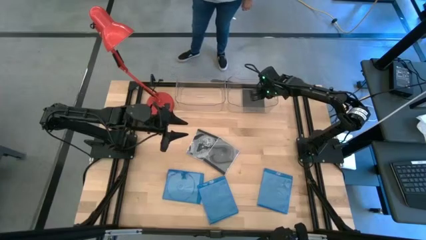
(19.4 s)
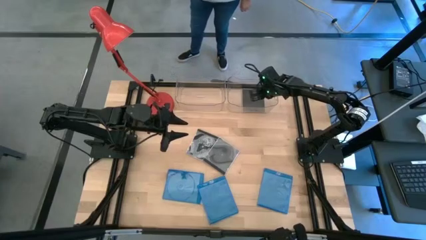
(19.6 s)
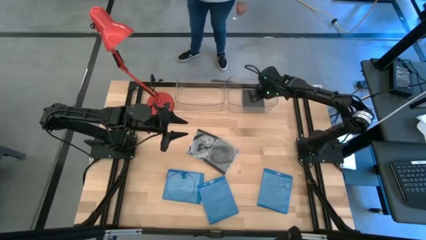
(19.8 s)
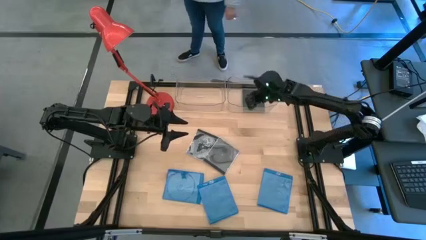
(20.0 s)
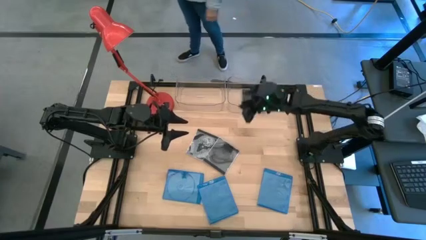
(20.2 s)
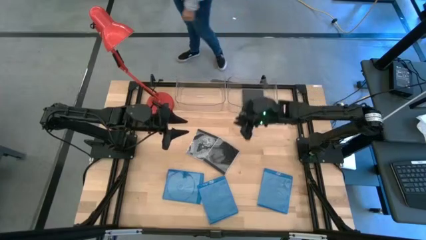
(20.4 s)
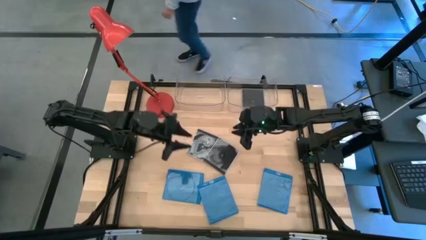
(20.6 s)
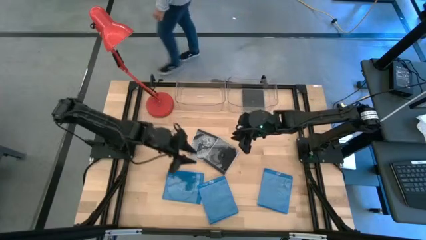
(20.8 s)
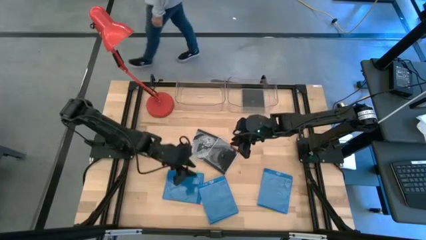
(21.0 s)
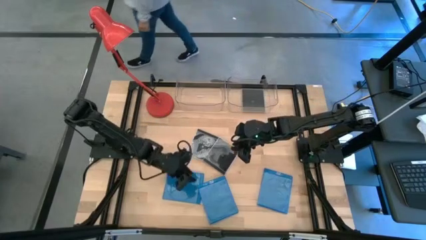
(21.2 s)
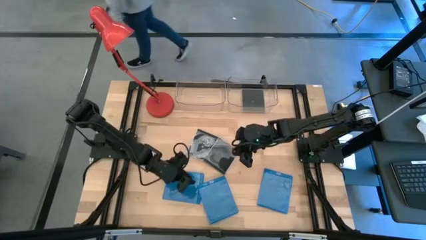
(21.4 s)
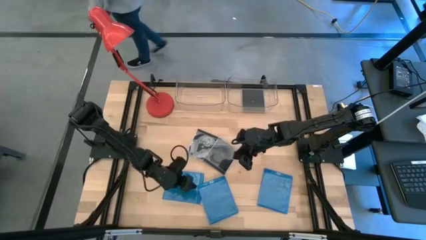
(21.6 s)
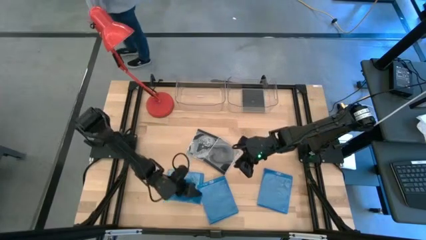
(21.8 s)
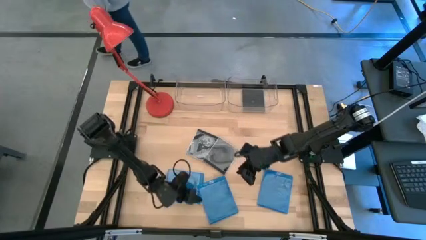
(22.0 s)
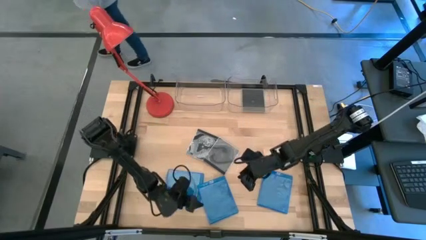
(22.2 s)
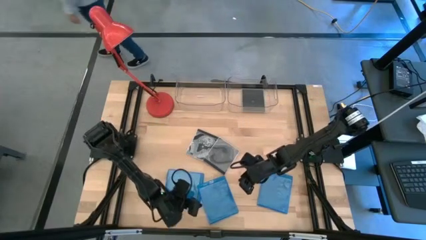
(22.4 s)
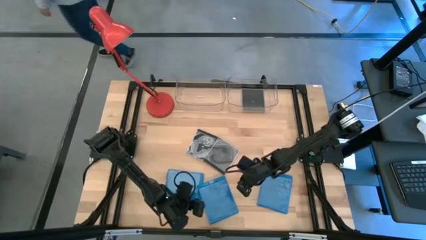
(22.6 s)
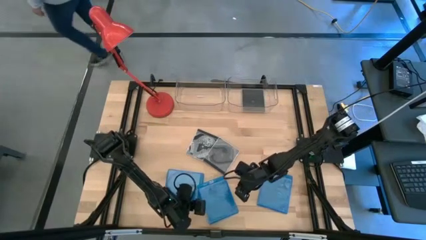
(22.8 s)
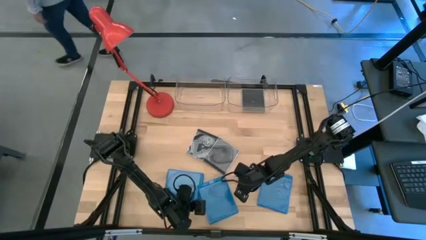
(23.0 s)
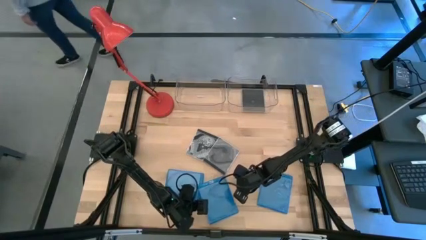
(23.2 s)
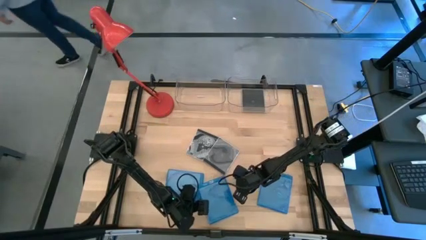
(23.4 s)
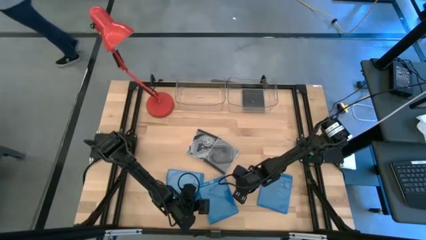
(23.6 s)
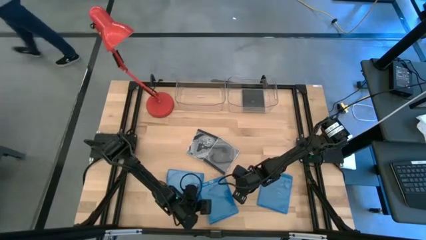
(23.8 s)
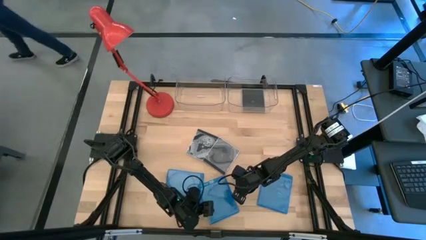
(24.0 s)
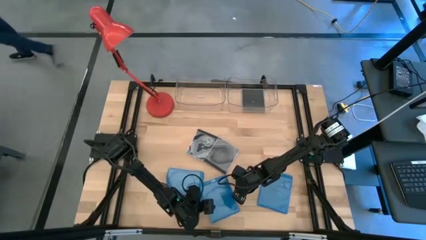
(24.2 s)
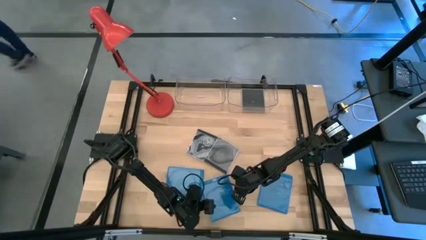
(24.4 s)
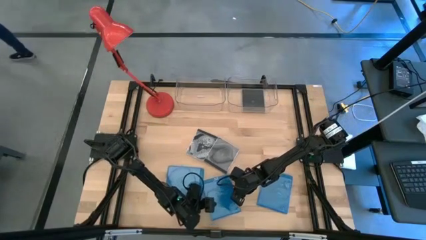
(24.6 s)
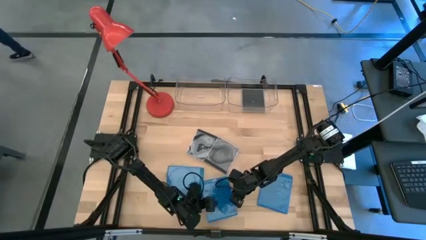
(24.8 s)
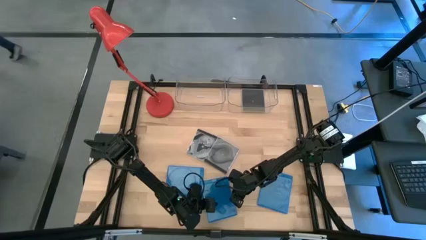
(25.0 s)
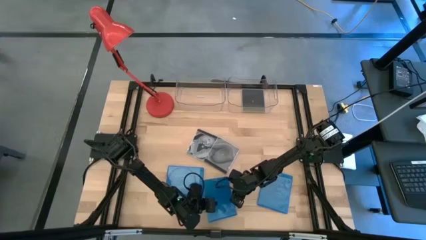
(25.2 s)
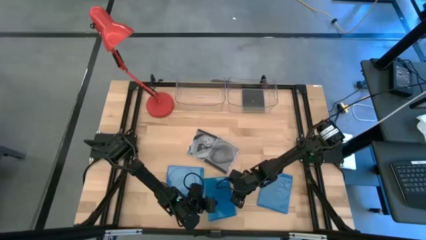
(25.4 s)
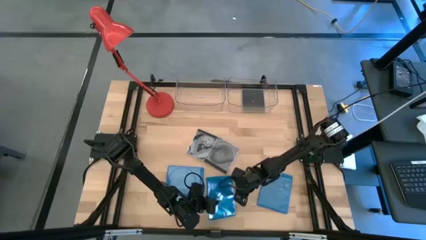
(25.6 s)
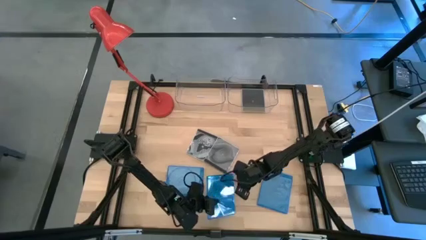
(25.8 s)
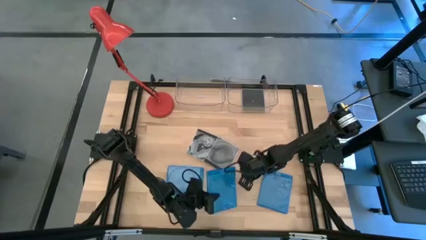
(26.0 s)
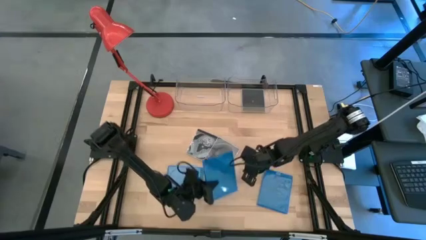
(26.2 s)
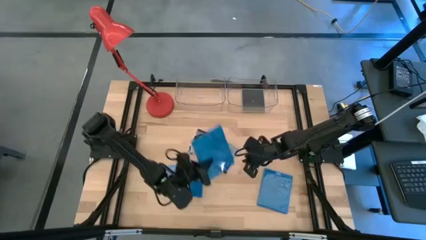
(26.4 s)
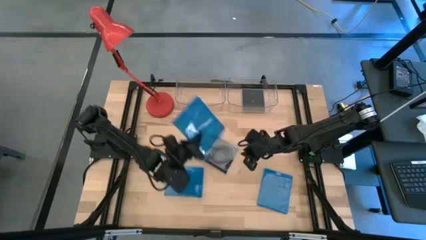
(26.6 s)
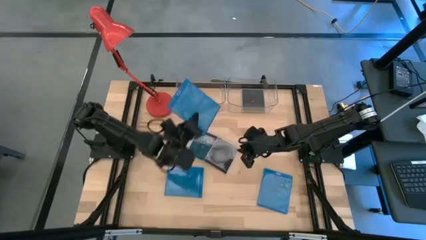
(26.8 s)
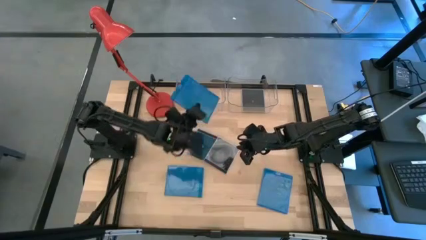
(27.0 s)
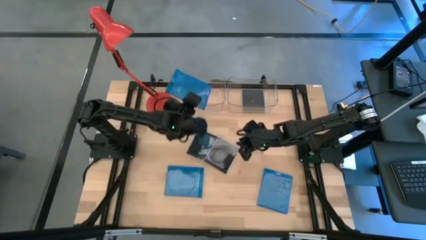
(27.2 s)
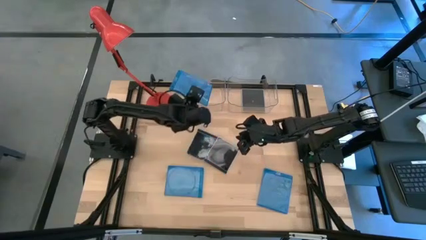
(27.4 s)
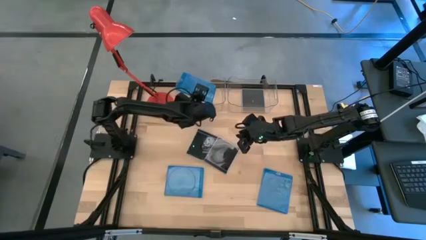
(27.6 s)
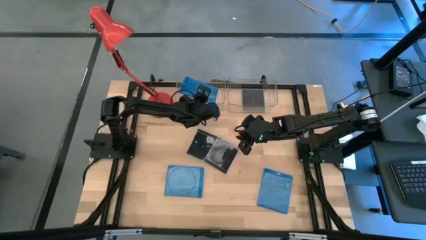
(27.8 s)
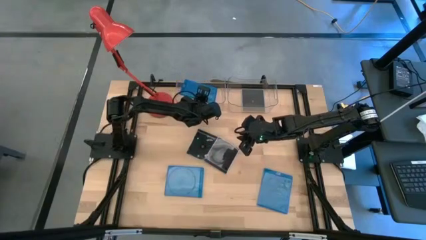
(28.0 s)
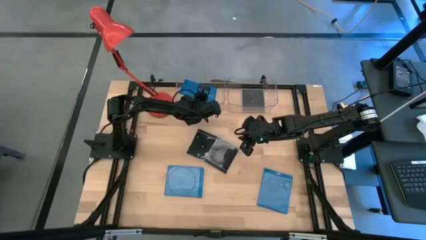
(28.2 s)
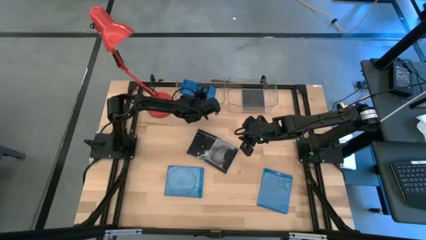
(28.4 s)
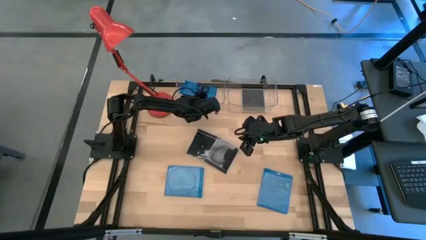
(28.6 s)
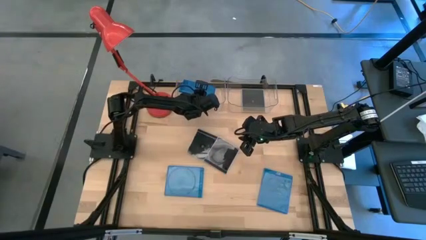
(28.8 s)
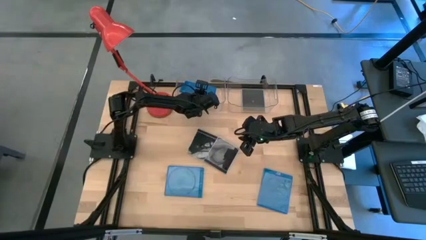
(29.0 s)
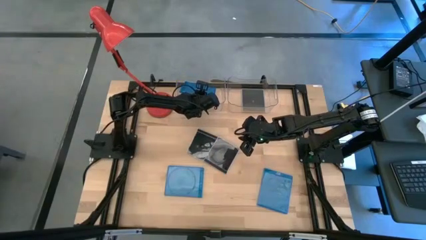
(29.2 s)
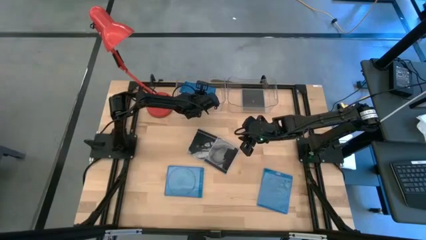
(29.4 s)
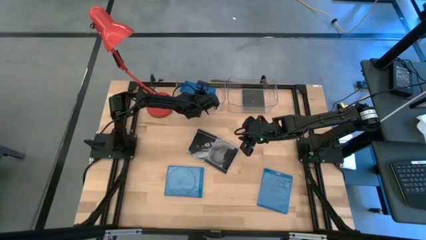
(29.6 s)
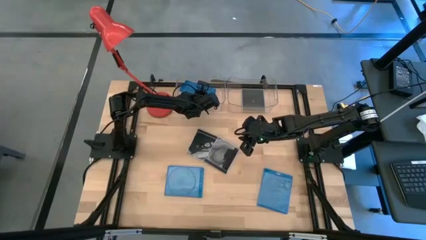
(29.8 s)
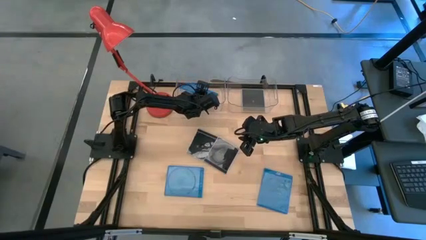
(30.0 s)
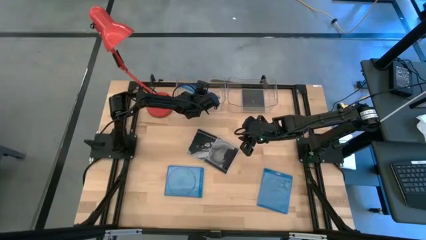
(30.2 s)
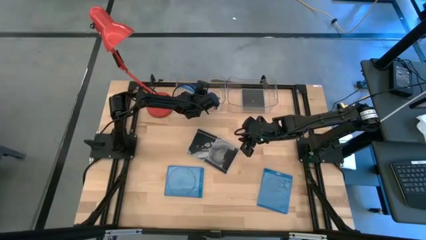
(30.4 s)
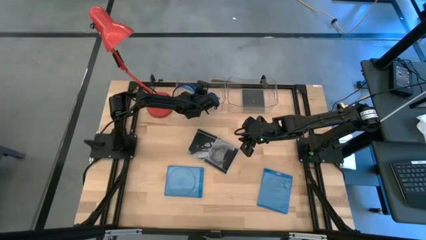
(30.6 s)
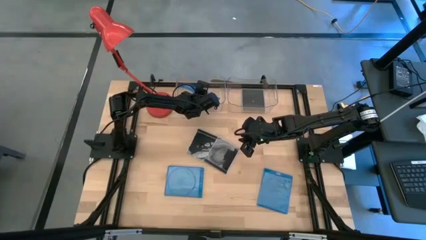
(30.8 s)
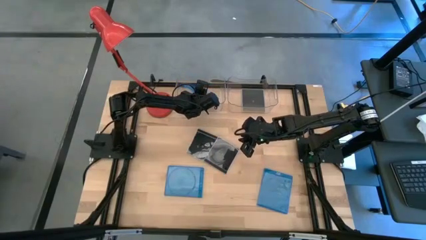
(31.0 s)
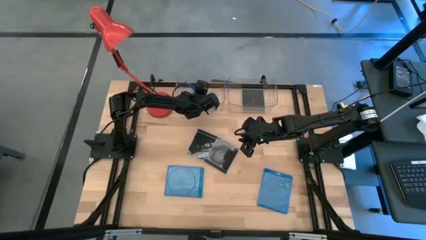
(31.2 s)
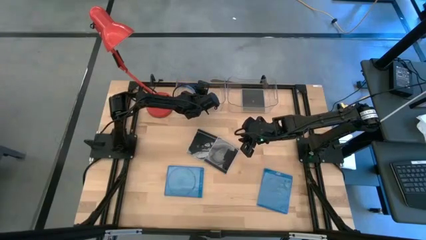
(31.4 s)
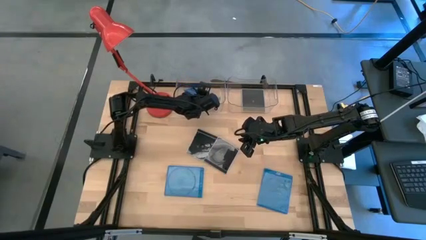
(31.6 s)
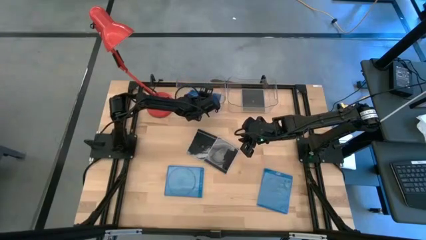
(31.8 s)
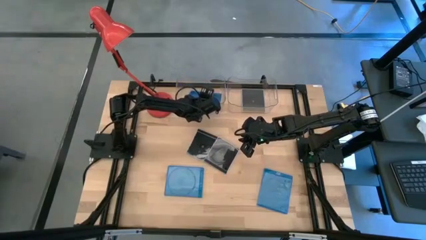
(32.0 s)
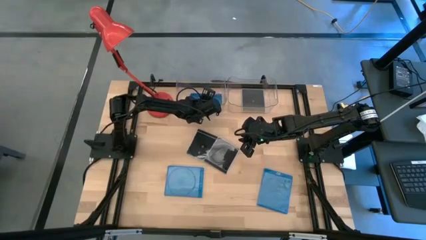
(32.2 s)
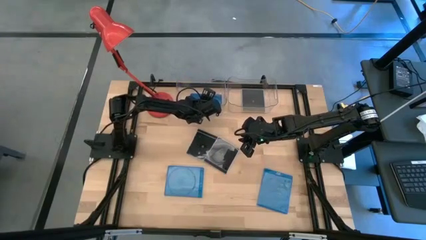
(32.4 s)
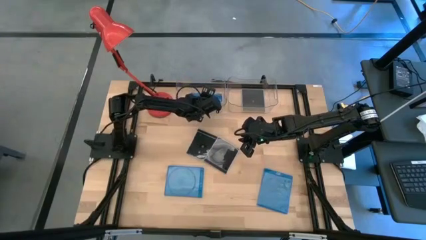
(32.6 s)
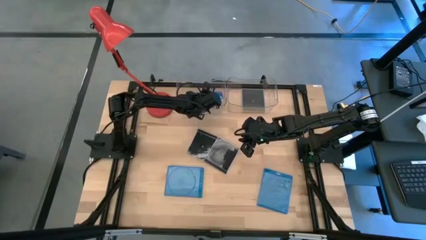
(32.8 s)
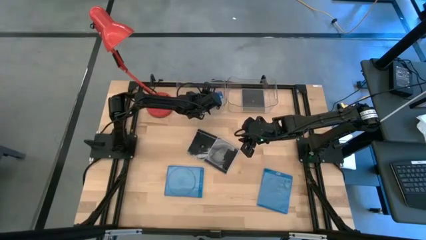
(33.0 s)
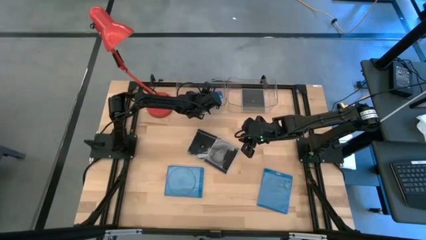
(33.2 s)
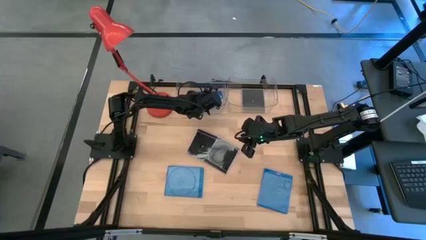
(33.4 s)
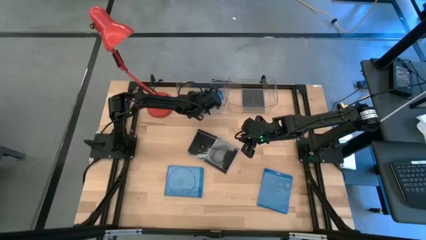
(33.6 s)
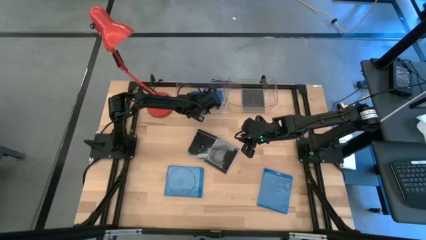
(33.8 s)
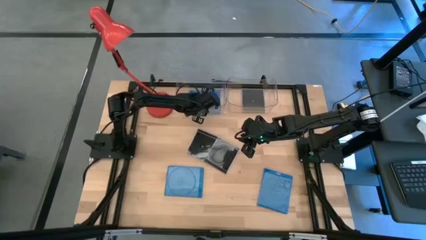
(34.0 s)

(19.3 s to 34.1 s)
Task: Pick & place jewel cases by type
Put the center blue cd case into the left transparent bin
